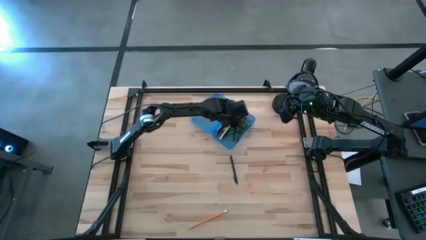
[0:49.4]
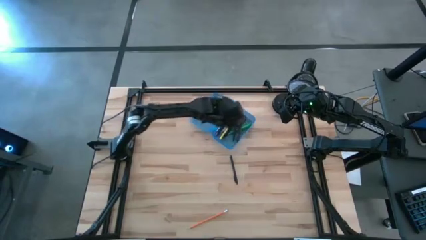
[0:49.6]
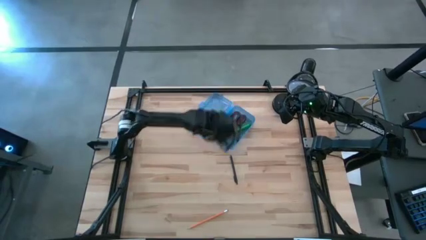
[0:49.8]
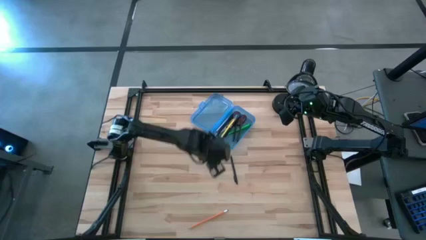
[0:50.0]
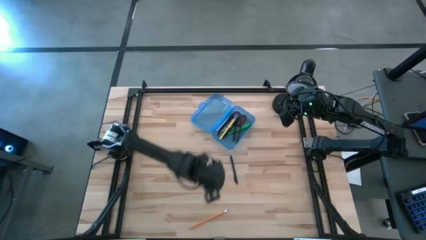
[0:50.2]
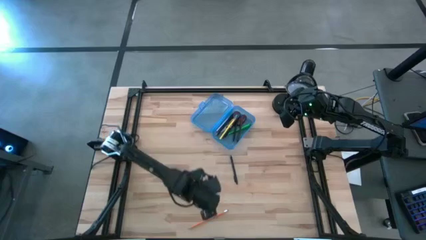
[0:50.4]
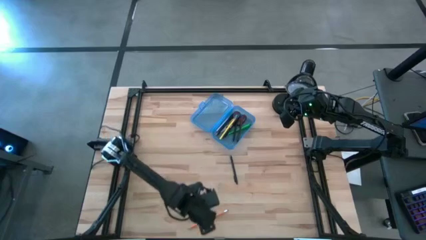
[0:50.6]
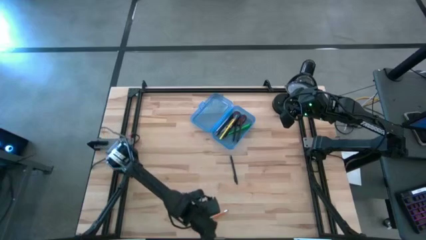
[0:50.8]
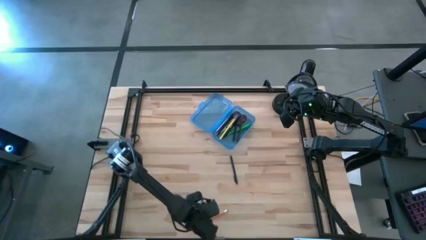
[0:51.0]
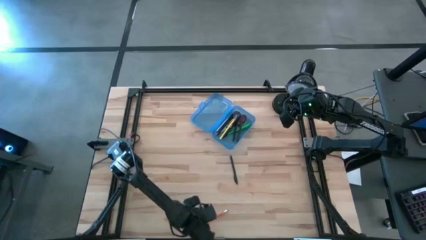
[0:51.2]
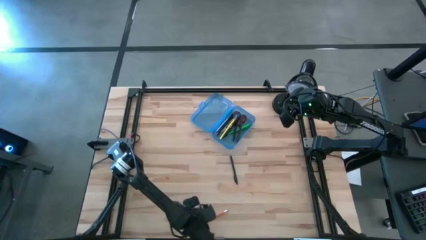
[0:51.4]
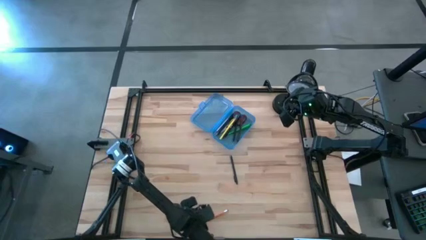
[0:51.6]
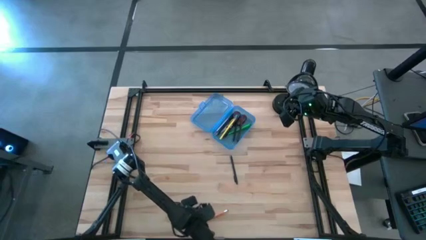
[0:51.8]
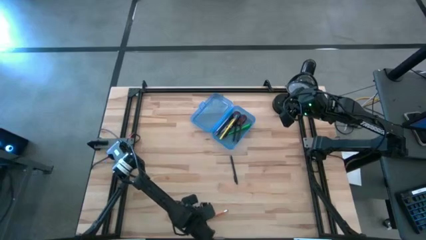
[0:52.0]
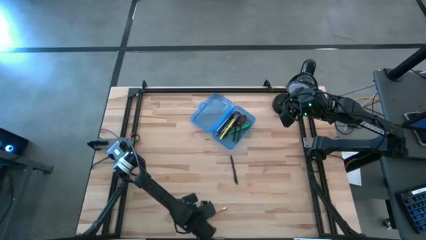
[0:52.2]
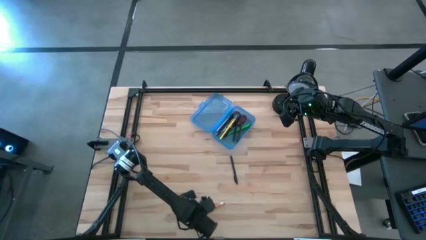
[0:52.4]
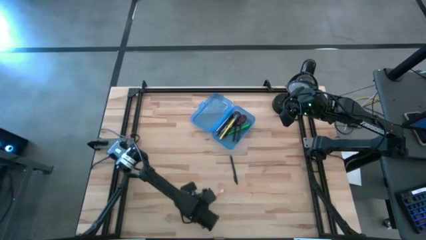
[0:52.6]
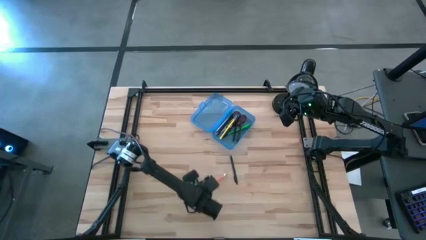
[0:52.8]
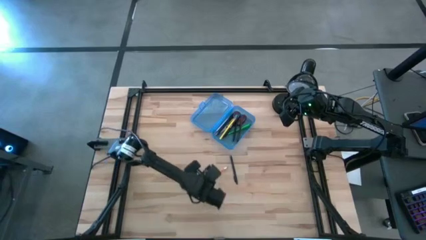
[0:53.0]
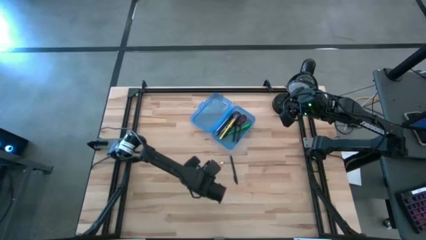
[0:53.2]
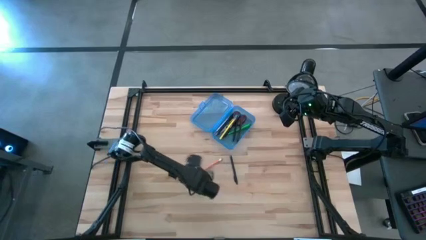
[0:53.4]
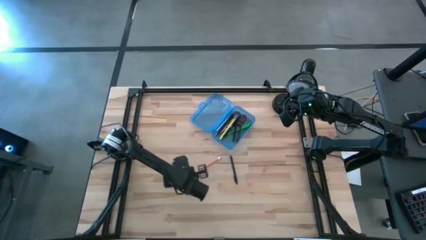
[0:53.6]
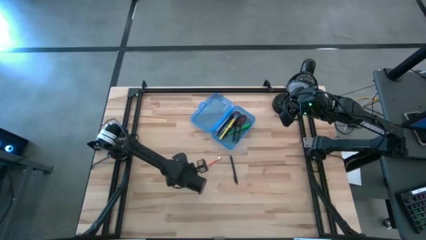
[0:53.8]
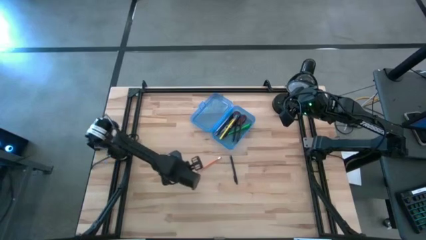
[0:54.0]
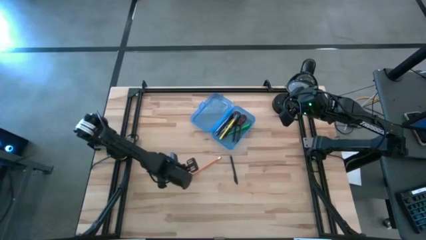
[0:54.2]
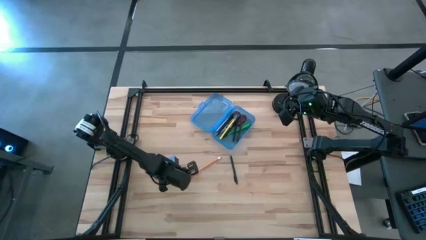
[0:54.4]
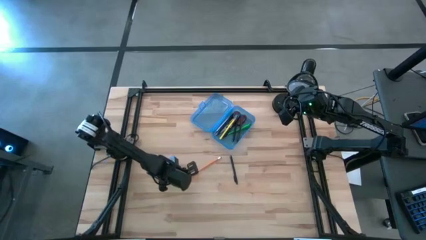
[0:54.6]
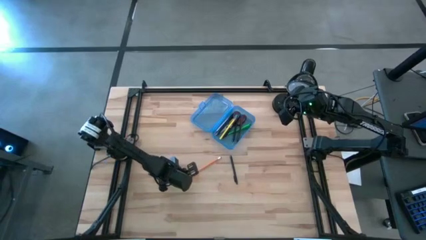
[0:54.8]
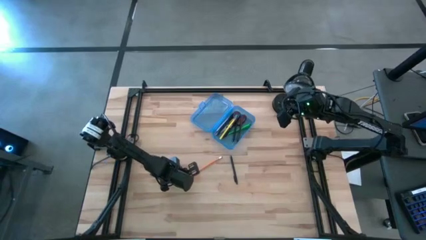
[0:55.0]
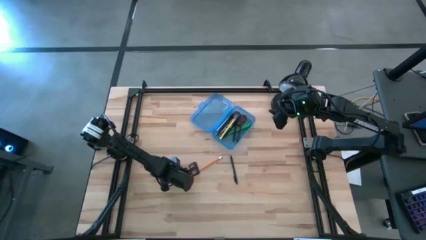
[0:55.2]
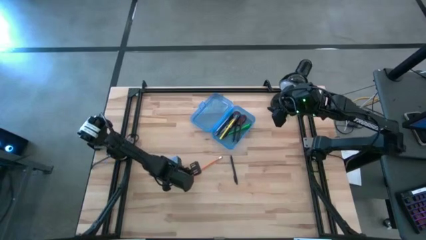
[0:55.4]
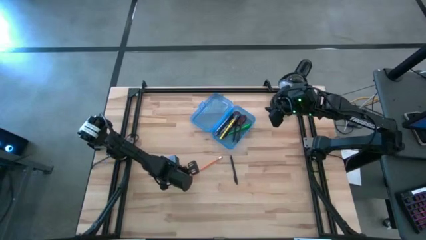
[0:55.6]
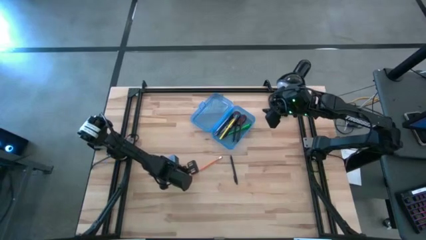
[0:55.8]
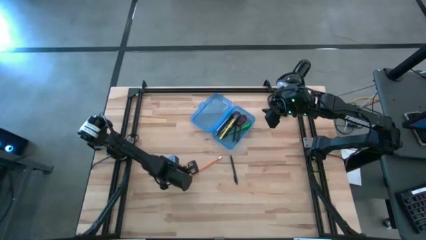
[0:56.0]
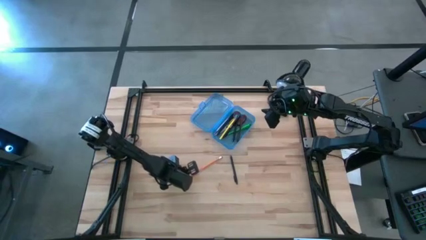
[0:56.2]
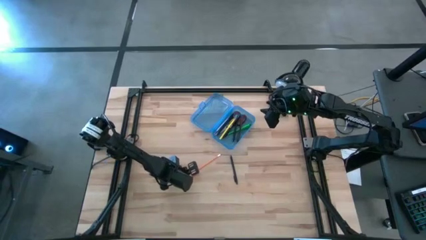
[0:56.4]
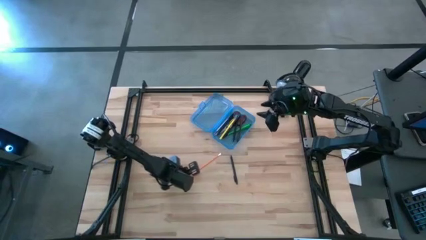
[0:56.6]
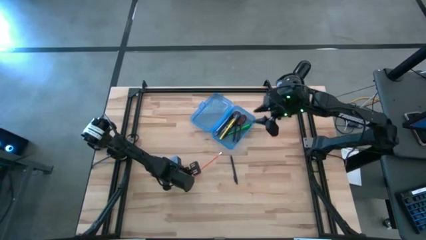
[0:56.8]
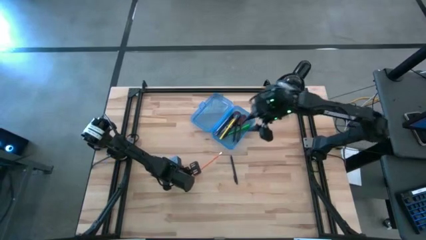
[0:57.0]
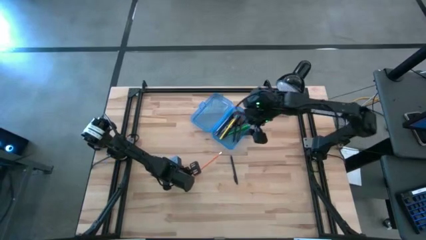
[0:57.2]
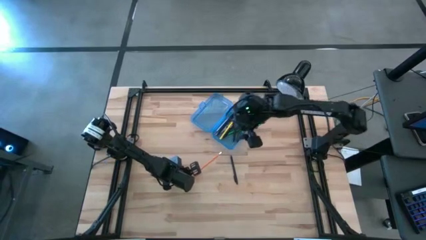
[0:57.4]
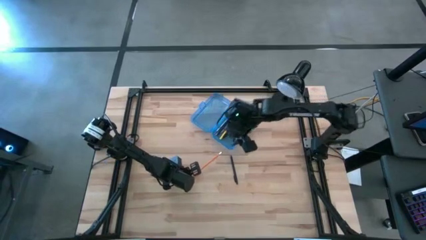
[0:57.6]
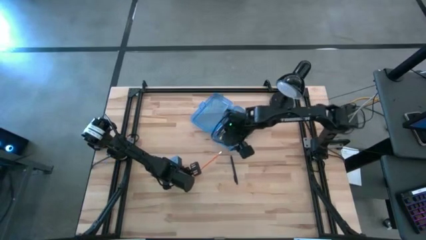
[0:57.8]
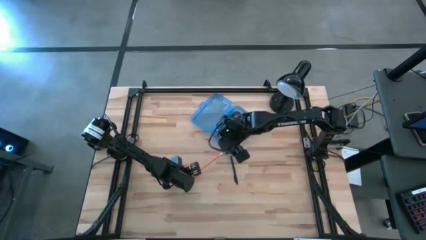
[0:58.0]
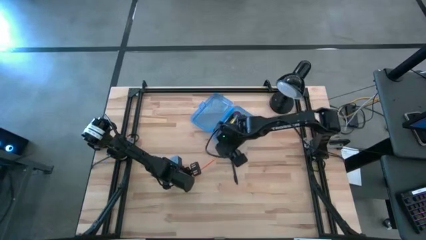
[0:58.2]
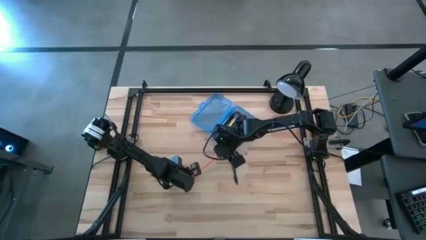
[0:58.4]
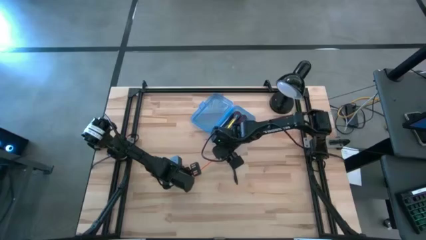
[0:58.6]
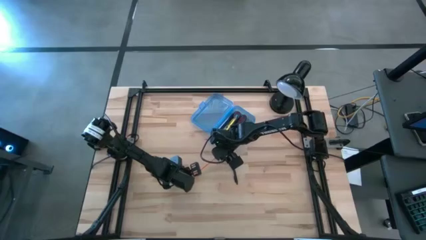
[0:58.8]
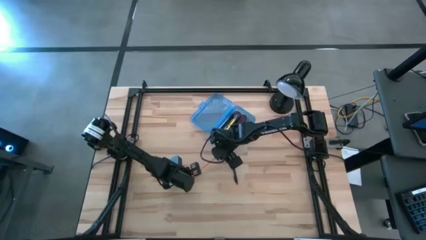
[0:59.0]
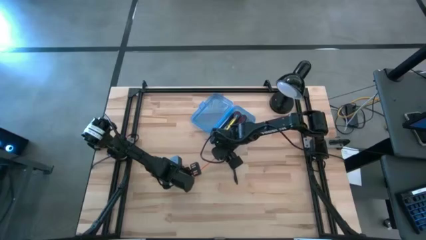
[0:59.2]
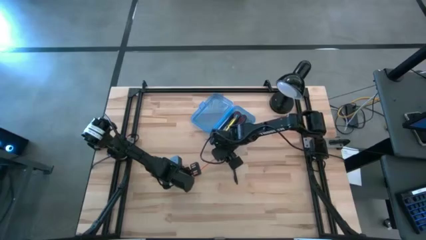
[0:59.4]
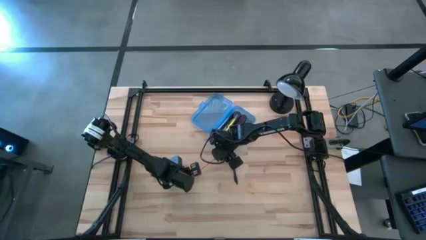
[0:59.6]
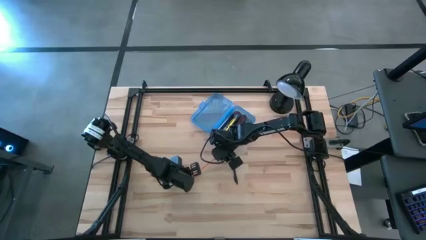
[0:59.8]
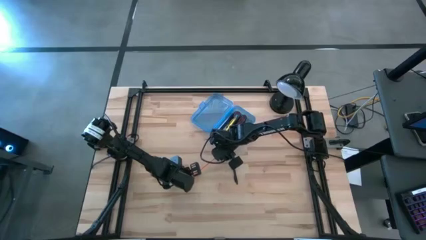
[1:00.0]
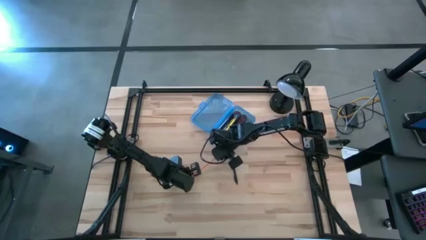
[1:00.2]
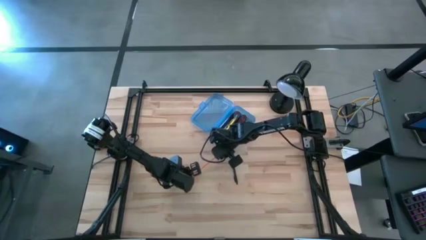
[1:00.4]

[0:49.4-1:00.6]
Task: Pick & place school supplies into a supply box
Put the orange pencil into the blue supply box

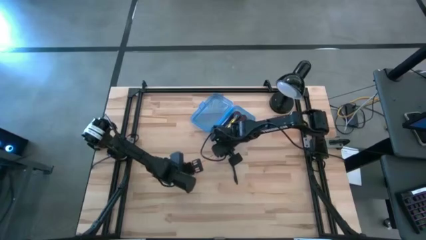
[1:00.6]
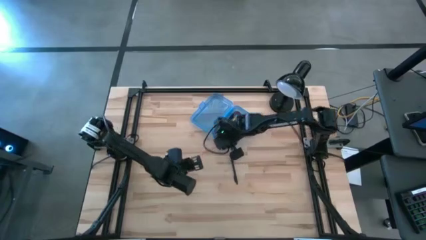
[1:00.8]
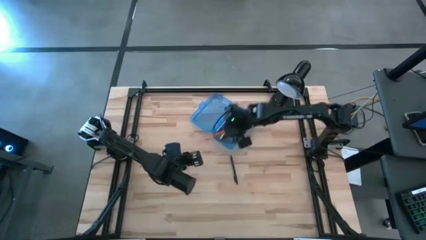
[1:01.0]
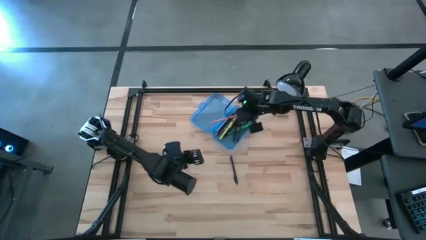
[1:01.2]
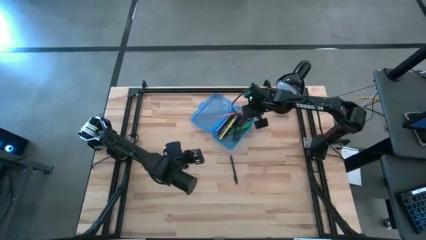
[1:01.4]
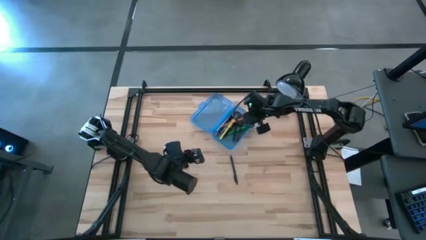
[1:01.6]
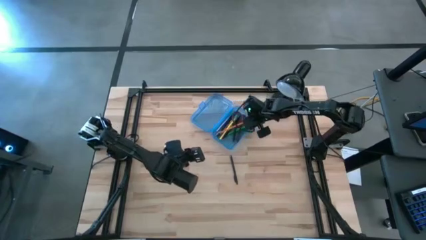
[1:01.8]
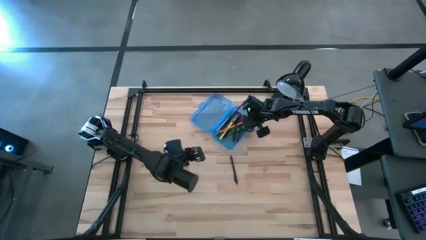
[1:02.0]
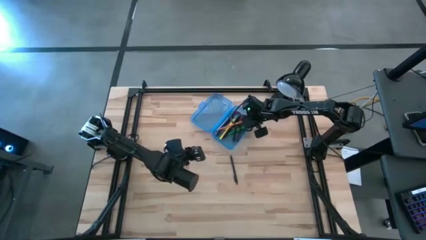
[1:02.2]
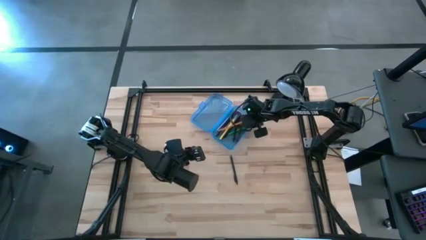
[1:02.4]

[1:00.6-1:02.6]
Put the orange pencil into the blue supply box

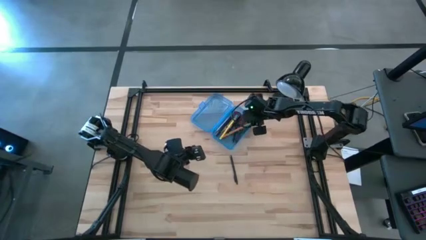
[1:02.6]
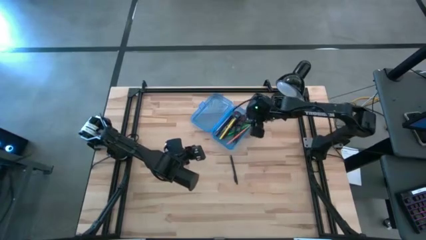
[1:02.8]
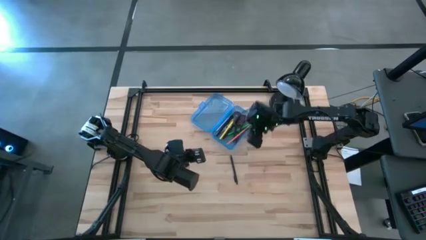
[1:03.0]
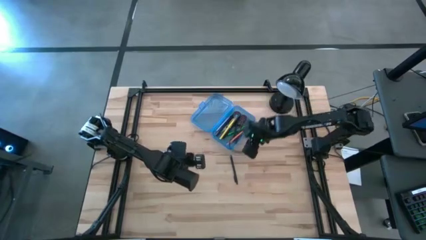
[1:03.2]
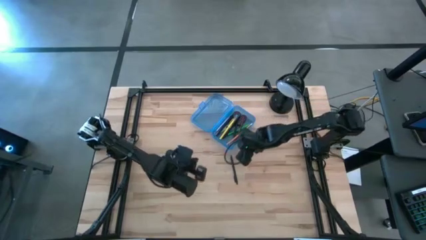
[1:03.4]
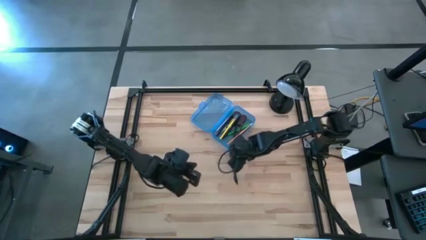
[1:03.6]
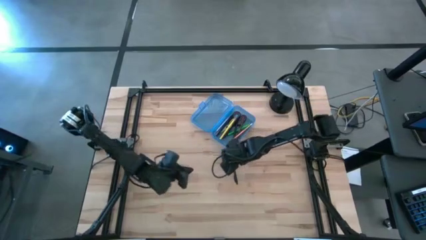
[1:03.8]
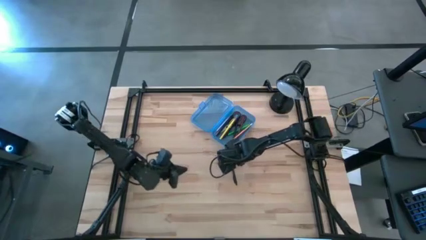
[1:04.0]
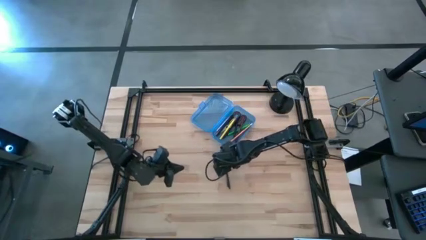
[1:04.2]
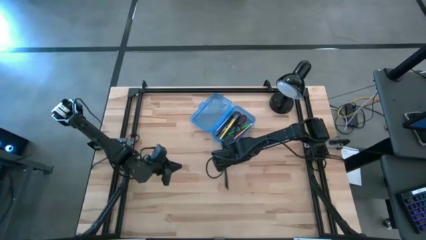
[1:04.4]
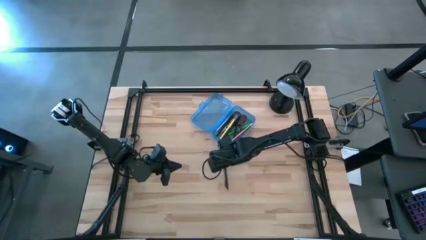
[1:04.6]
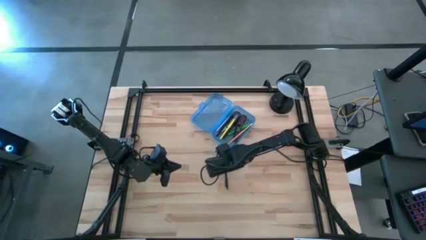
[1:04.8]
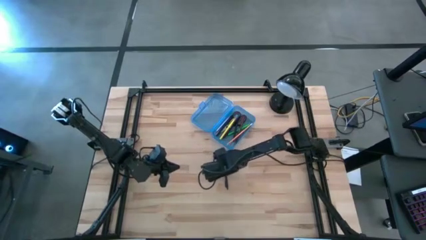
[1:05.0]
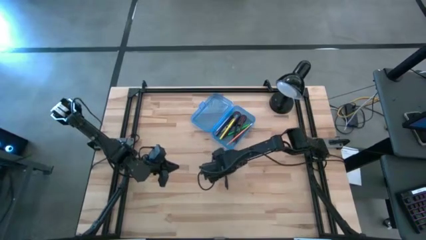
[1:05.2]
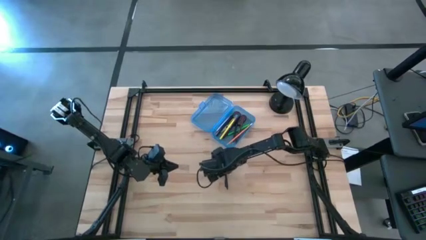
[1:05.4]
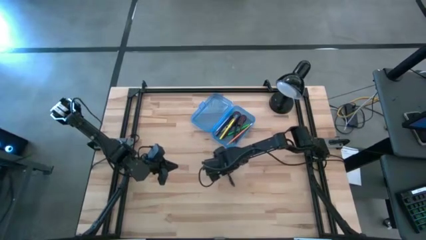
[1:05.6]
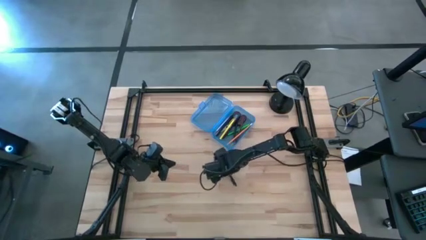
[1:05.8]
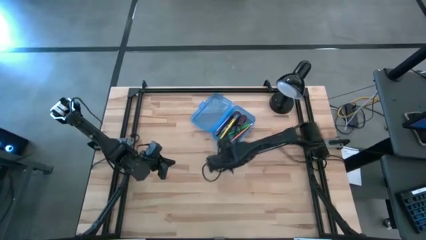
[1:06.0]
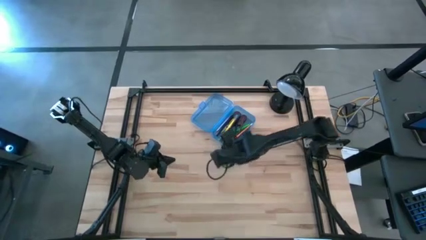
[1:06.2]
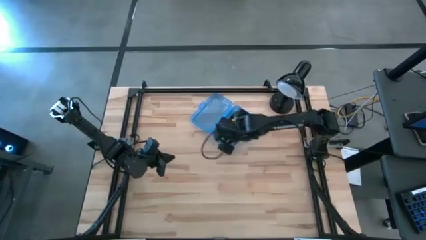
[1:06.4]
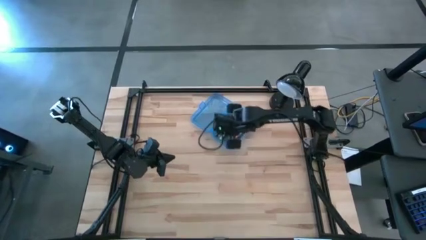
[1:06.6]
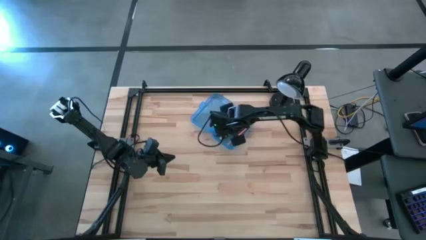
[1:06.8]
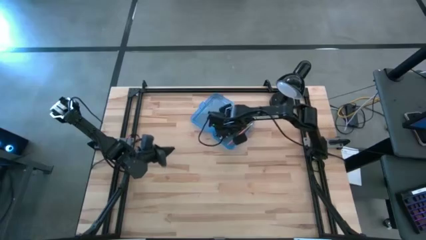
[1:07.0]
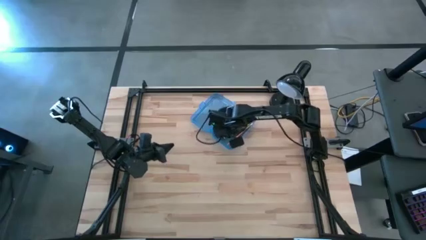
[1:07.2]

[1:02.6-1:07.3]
Put the black pen into the blue supply box
